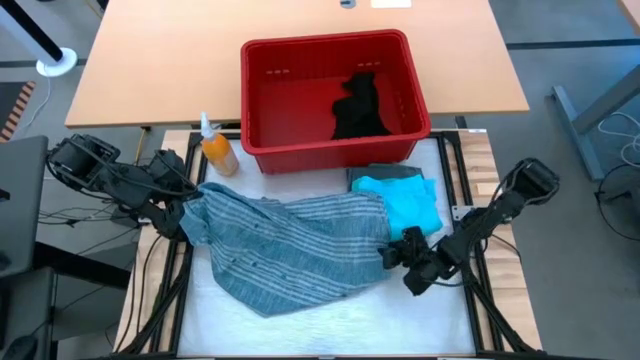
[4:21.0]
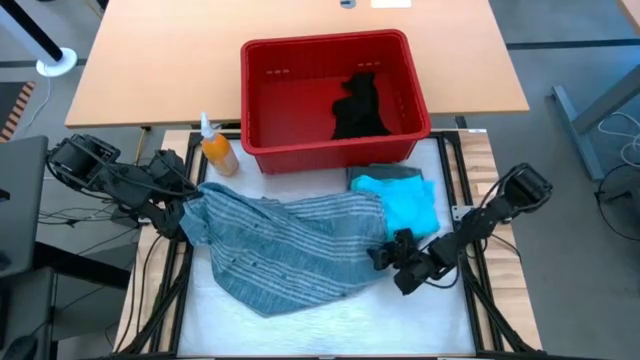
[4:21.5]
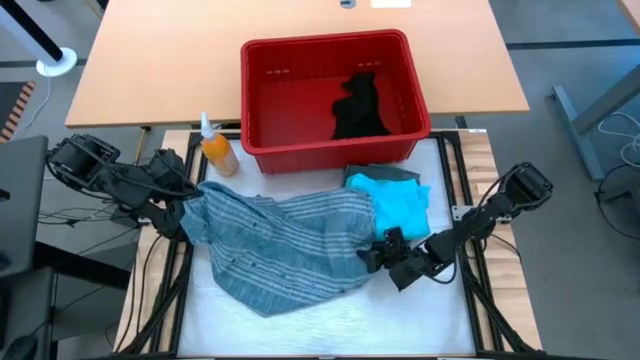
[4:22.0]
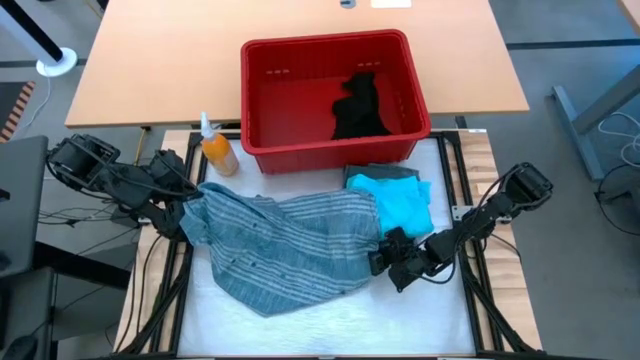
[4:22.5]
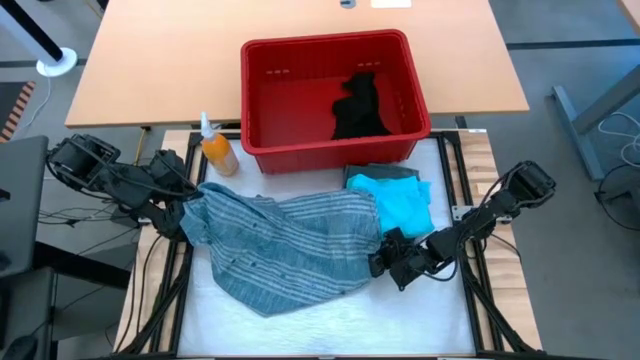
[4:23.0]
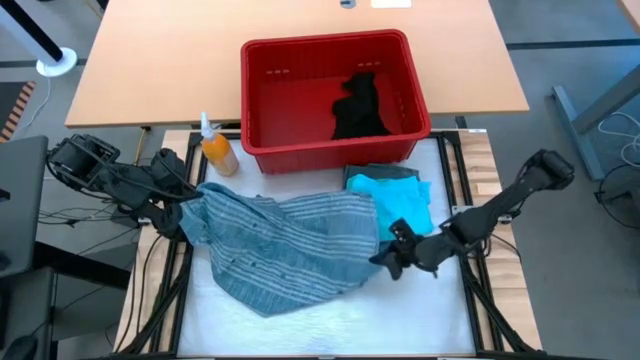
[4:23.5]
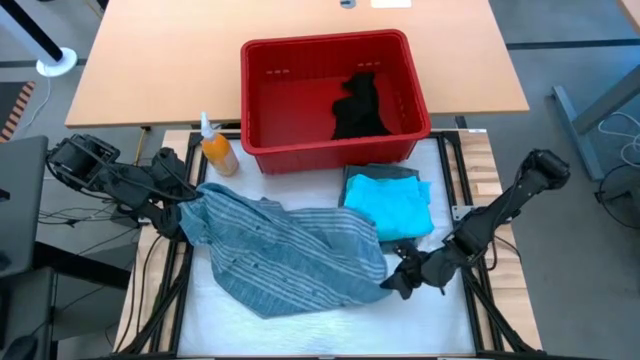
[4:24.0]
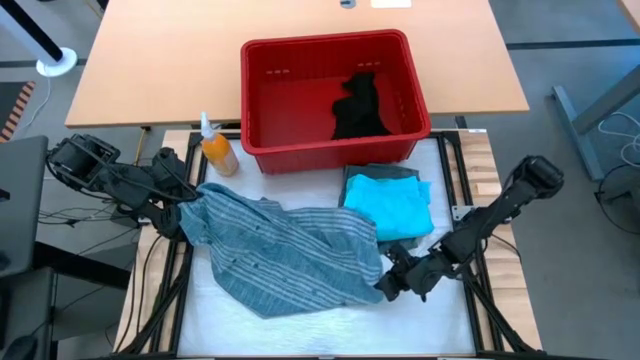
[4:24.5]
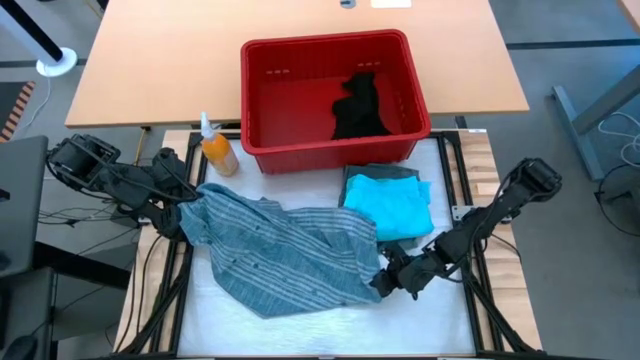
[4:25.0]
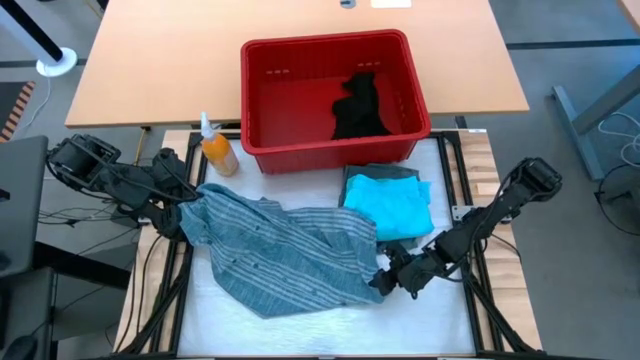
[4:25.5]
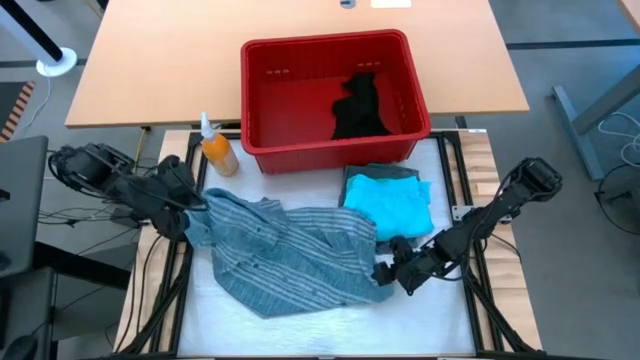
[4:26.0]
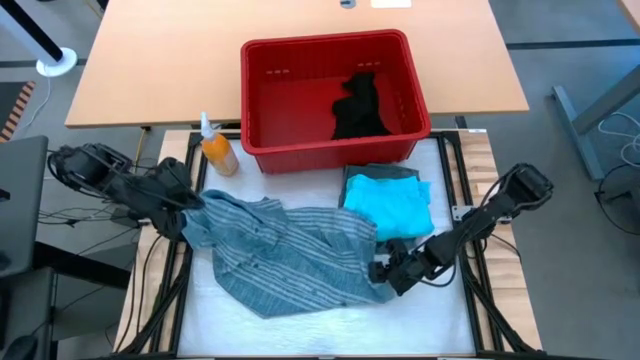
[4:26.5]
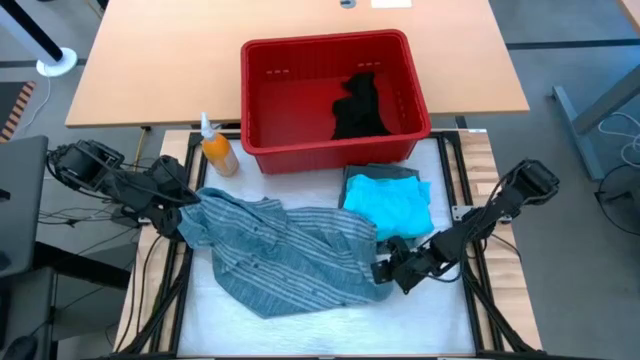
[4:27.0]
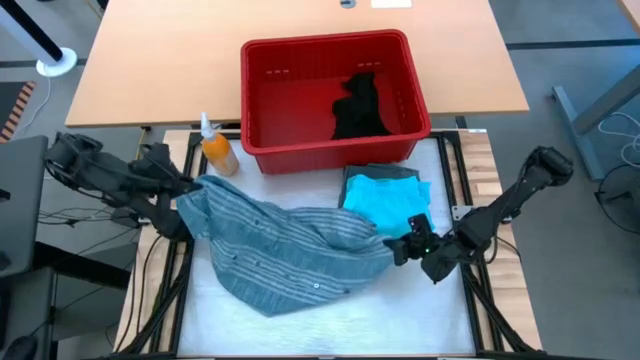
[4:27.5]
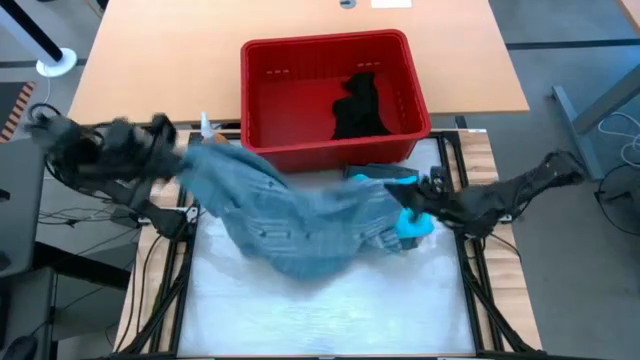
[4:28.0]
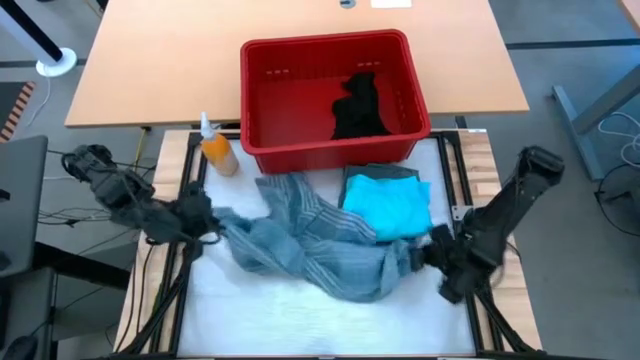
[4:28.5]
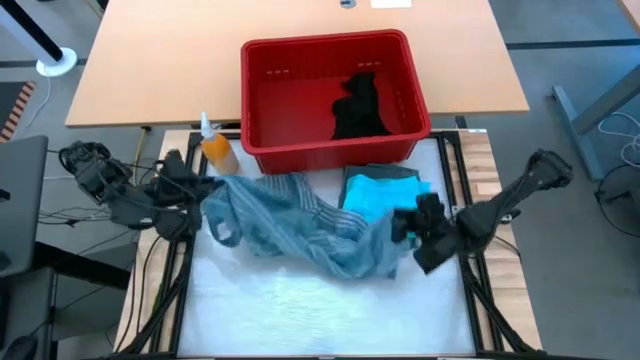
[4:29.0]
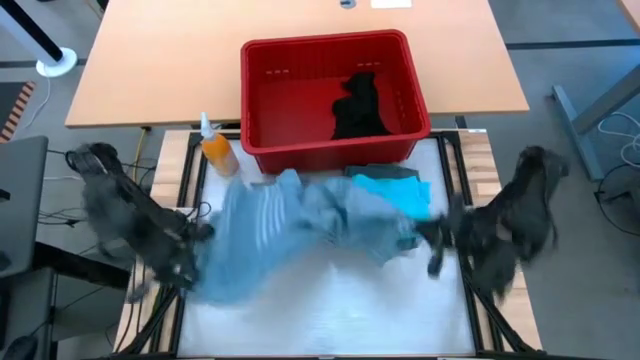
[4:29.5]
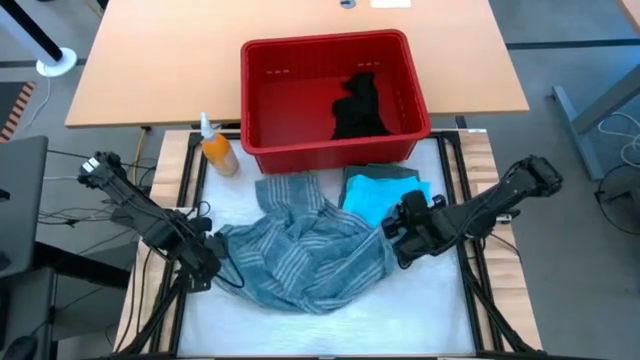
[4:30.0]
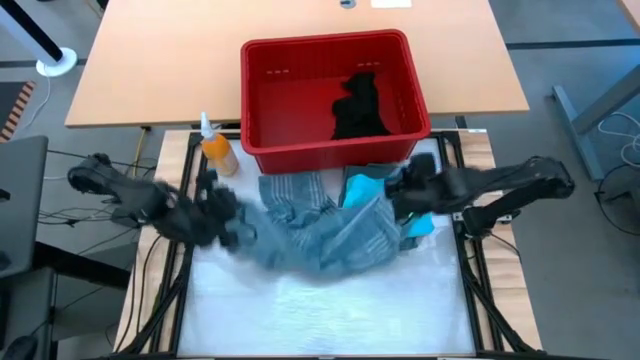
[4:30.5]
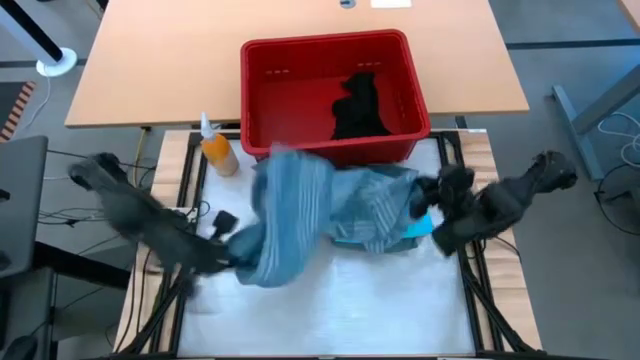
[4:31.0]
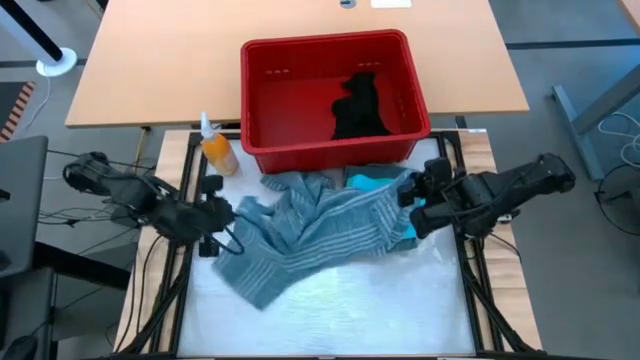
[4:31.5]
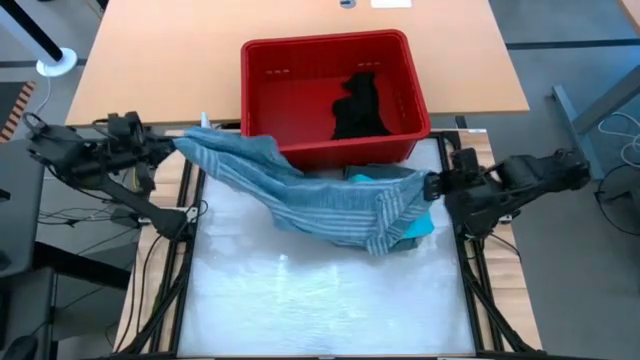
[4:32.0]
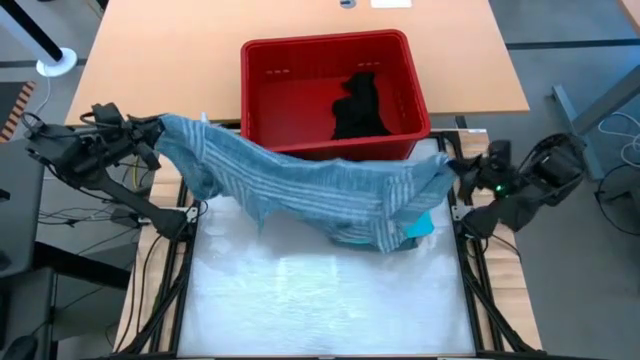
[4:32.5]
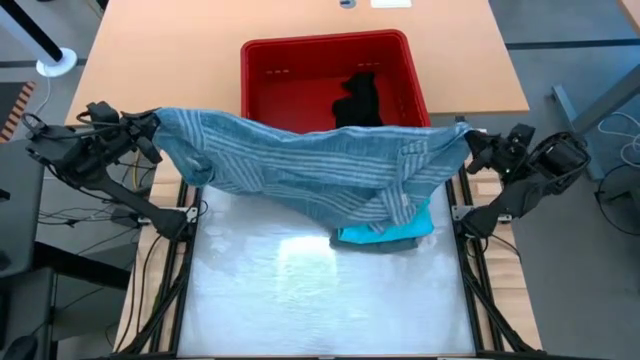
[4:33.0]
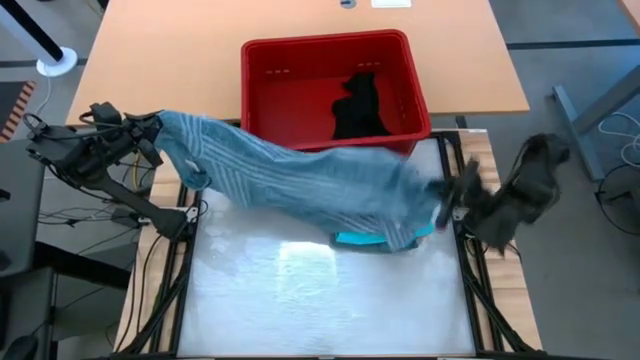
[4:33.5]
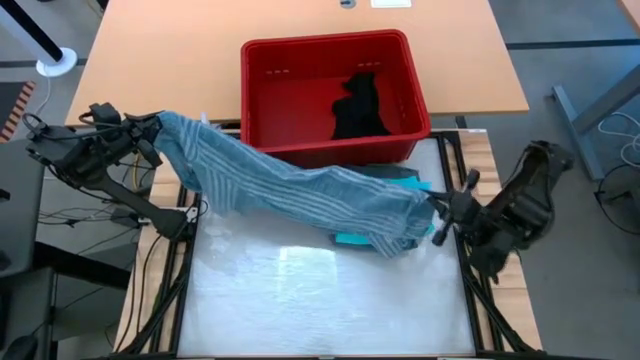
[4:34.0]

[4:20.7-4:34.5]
Task: Fold Laundry from Bin
Fold the blue patterned polo shirt

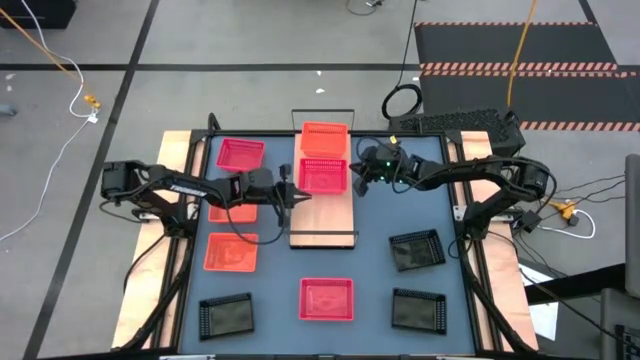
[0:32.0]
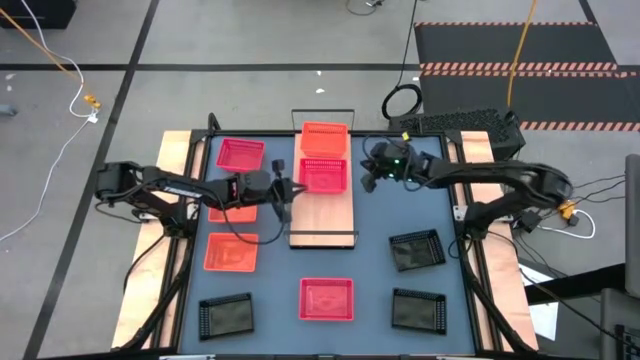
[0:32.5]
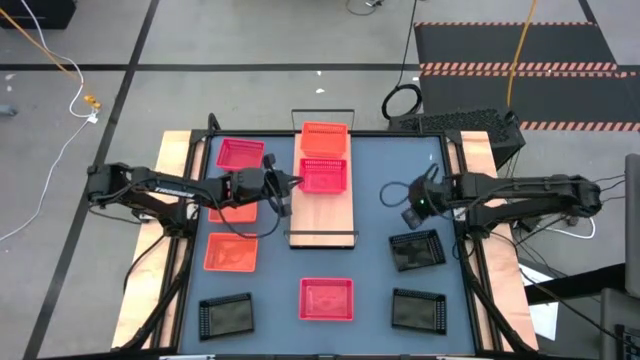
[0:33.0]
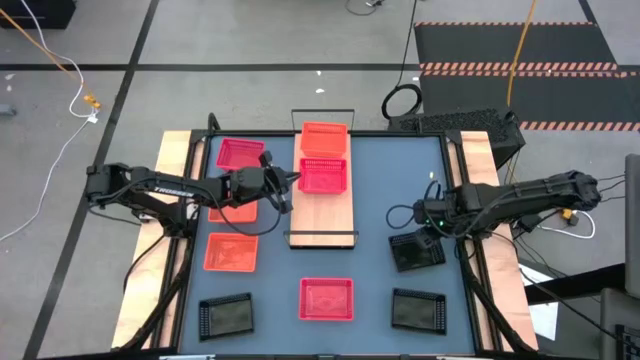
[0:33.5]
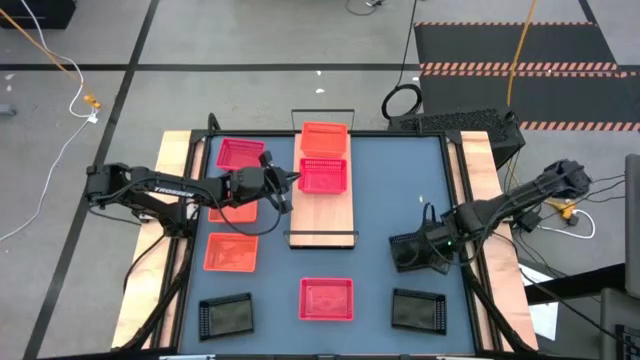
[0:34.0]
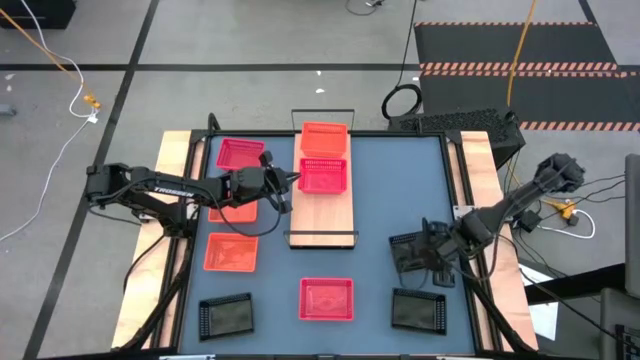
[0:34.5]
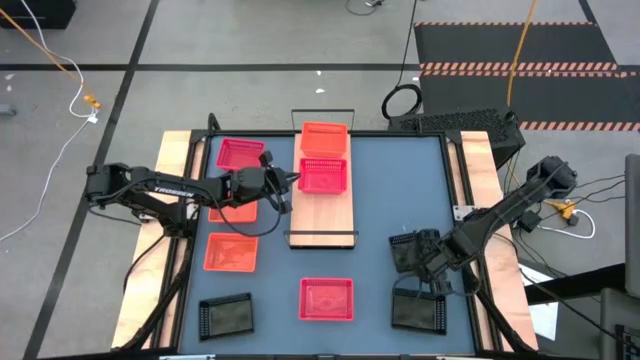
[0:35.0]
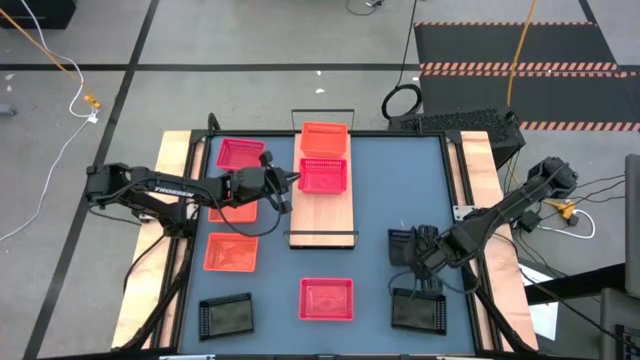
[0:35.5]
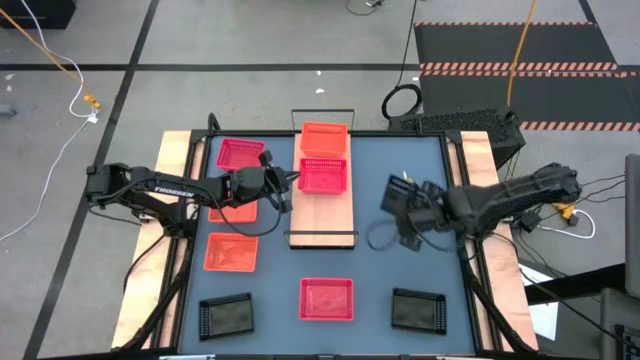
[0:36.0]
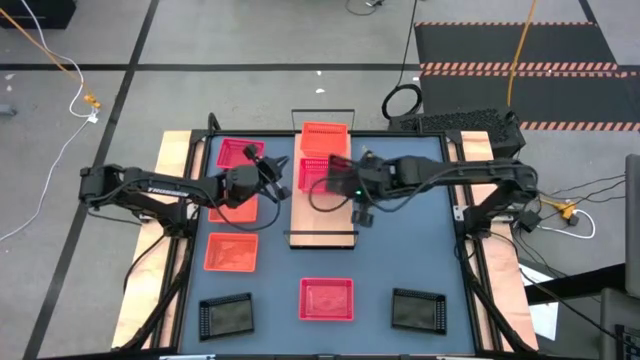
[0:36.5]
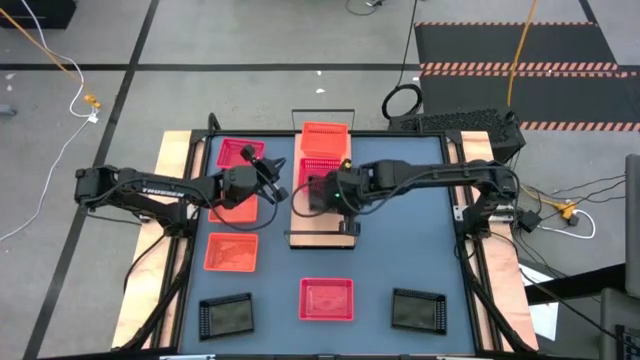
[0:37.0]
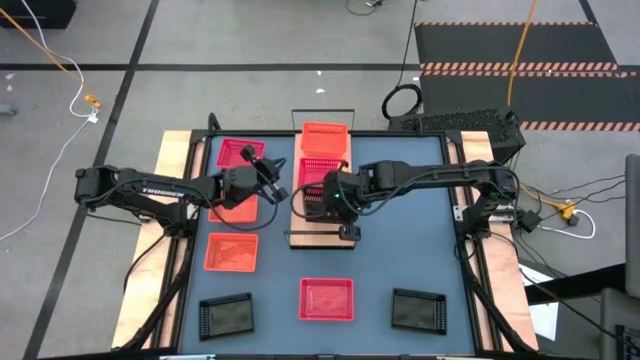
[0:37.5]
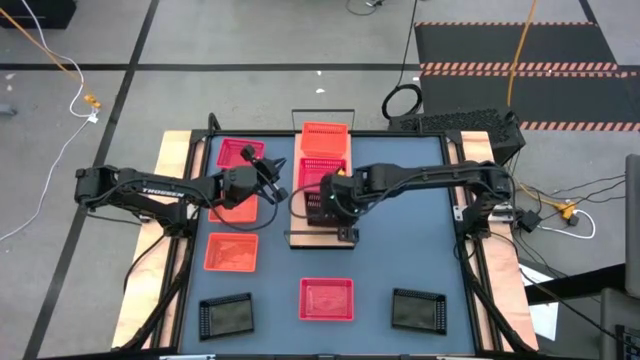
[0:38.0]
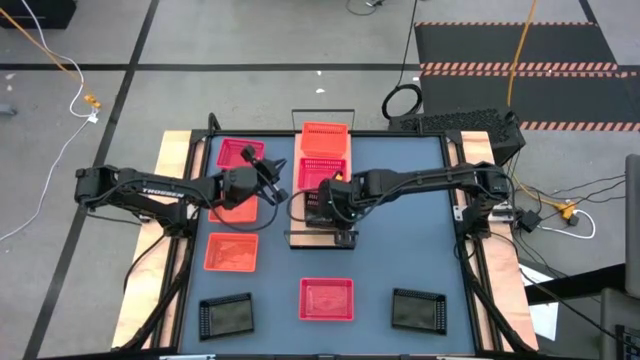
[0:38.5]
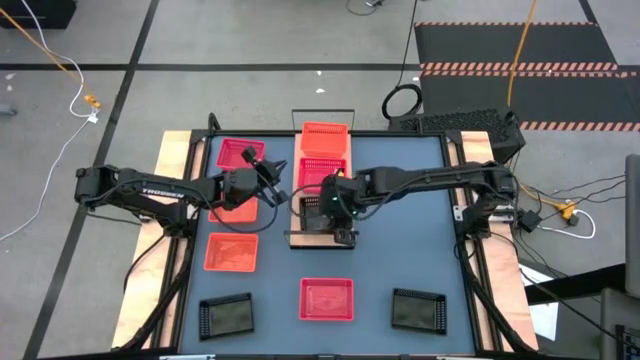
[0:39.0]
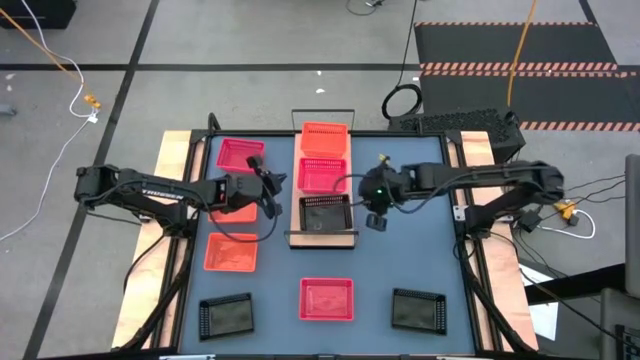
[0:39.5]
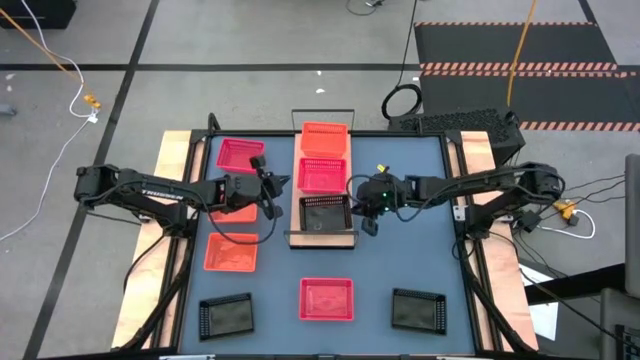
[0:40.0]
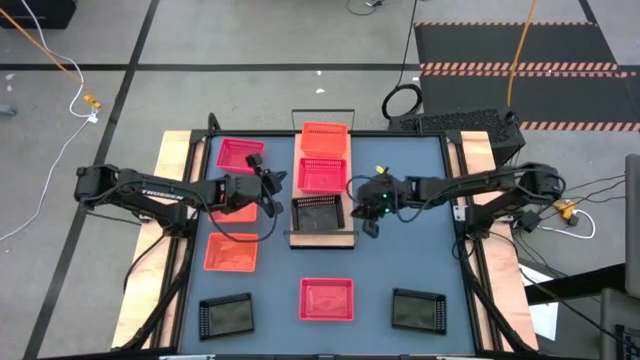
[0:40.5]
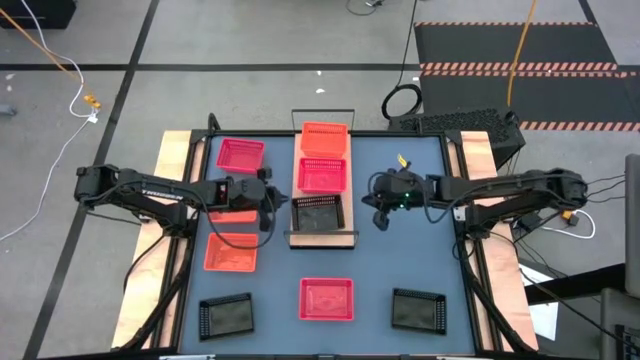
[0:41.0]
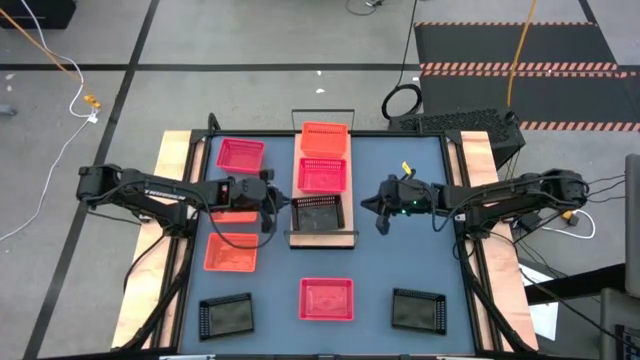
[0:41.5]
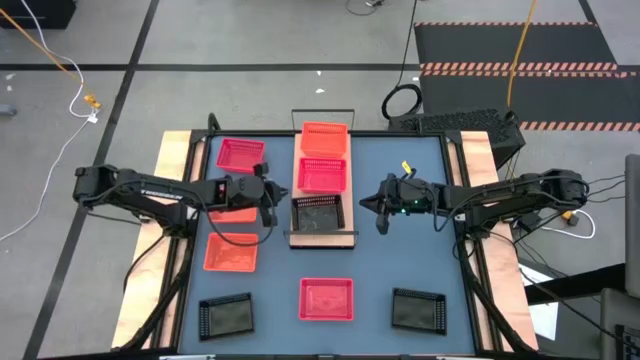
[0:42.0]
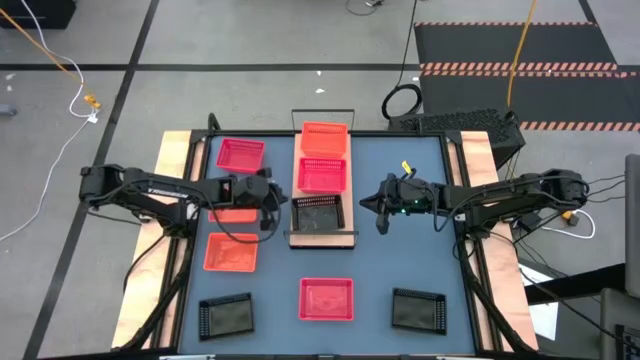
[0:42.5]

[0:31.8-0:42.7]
Task: Stack baskets on shelf by color
Put the top black bin on the shelf
